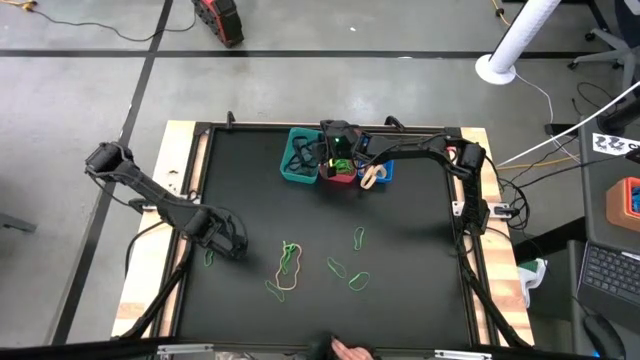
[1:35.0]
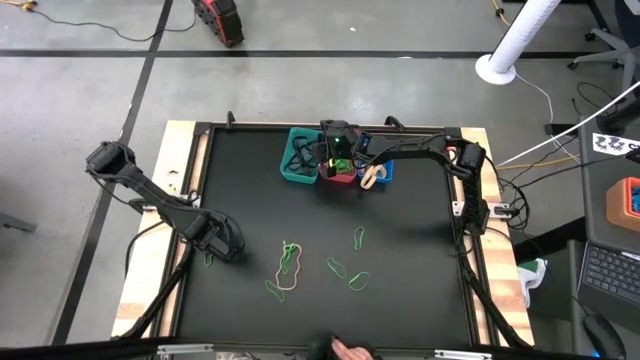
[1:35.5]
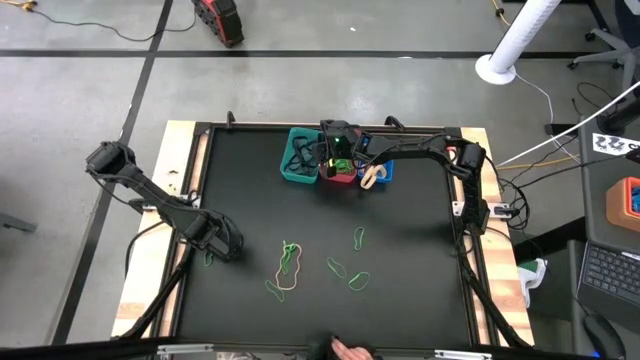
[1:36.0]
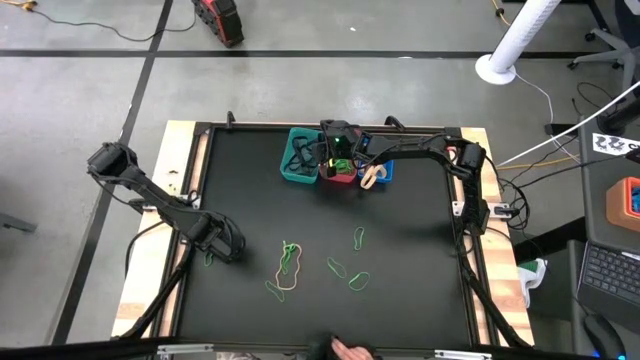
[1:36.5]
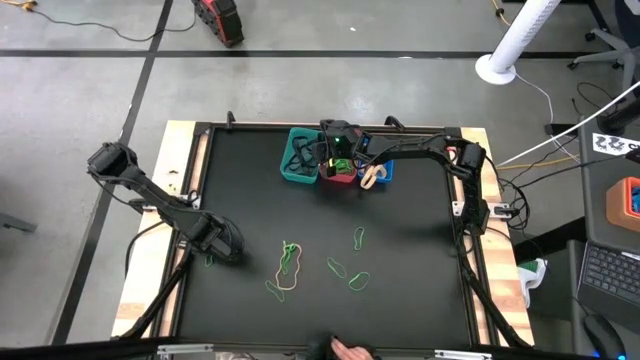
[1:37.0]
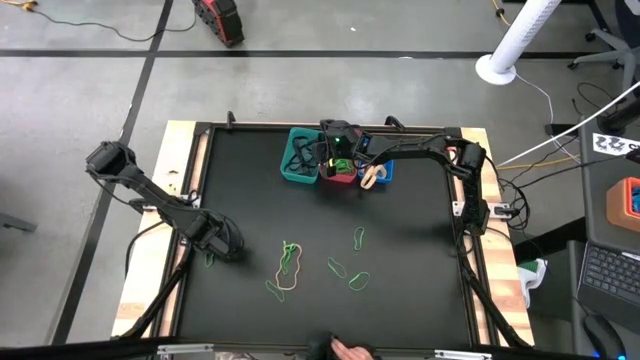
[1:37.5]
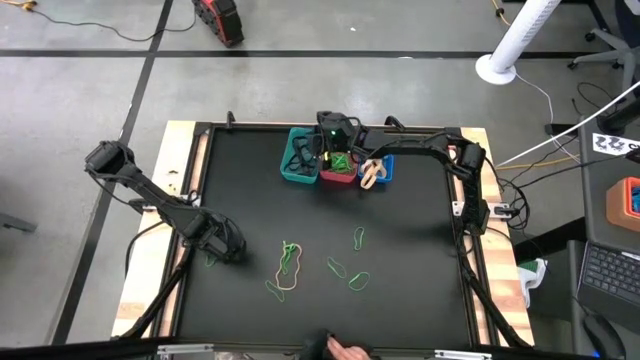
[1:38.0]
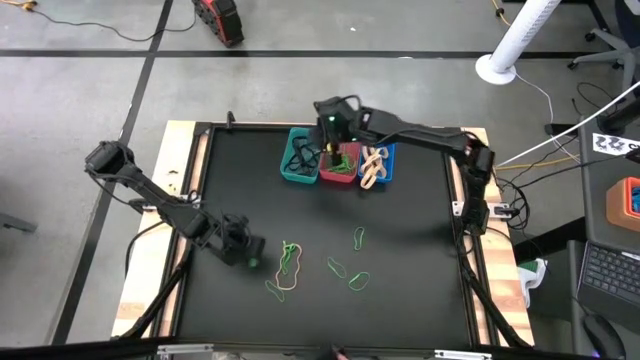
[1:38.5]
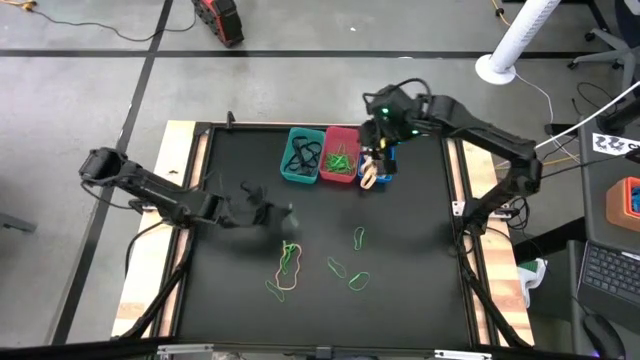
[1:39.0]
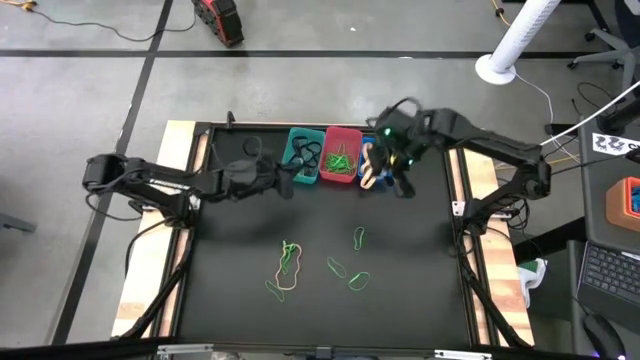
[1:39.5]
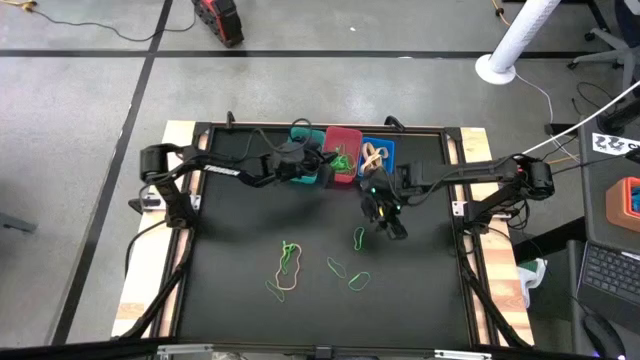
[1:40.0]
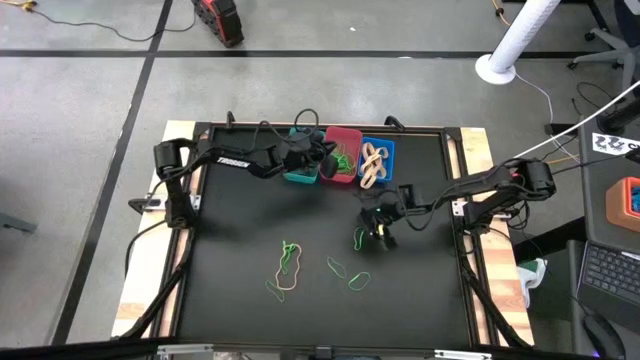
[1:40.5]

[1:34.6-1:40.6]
Task: Sort rubber bands into baskets
Put the green rubber band into the pink bin

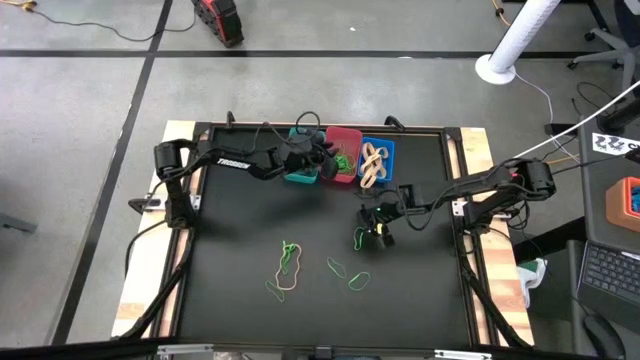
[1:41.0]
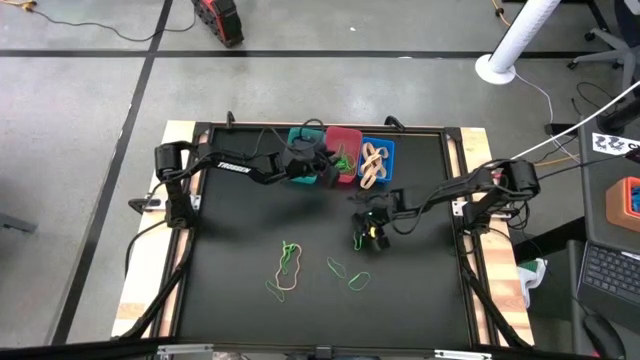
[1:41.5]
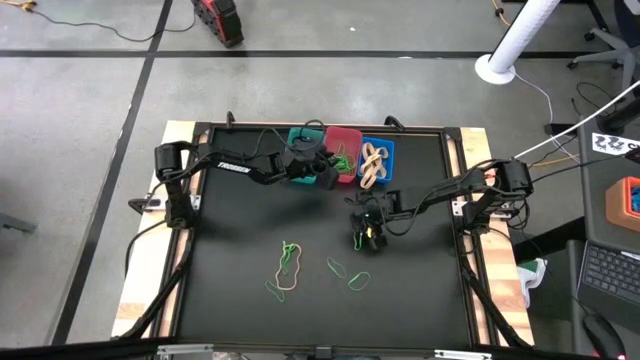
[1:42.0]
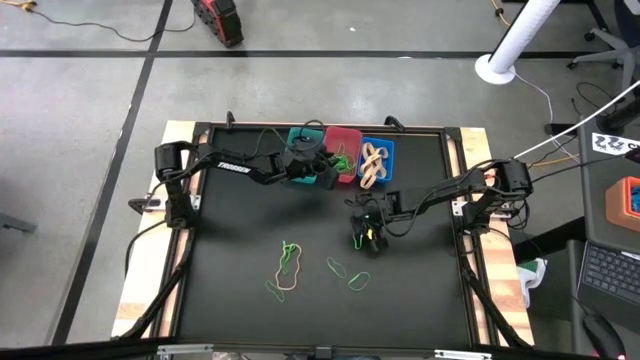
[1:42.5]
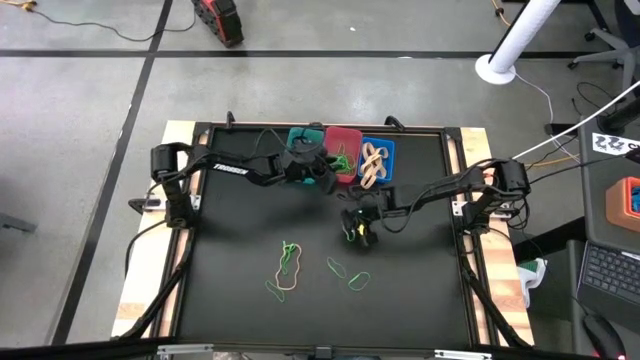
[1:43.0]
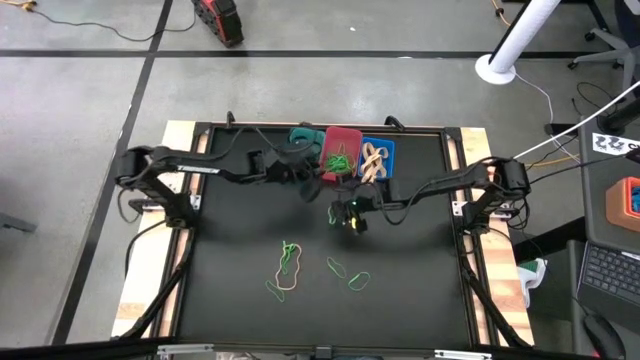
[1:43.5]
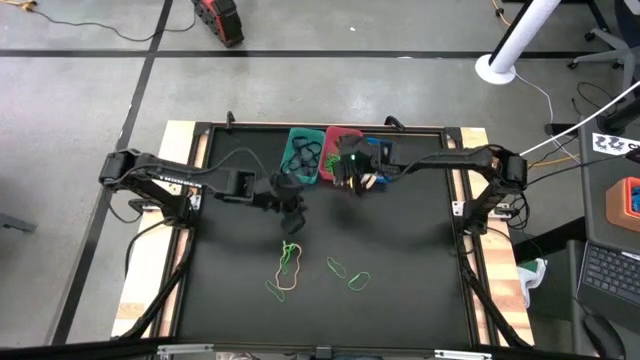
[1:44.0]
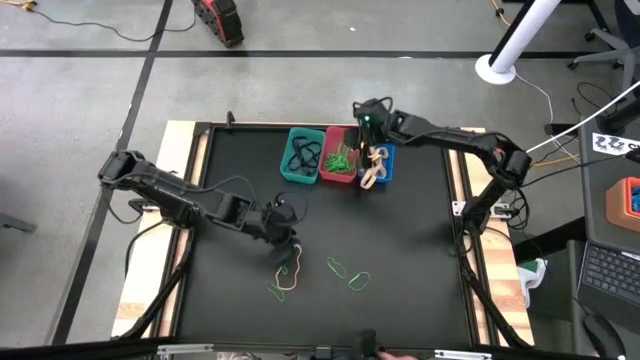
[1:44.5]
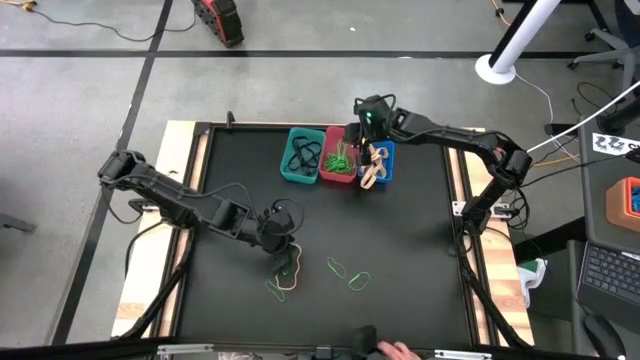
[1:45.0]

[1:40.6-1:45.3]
Put the green rubber band into the pink bin

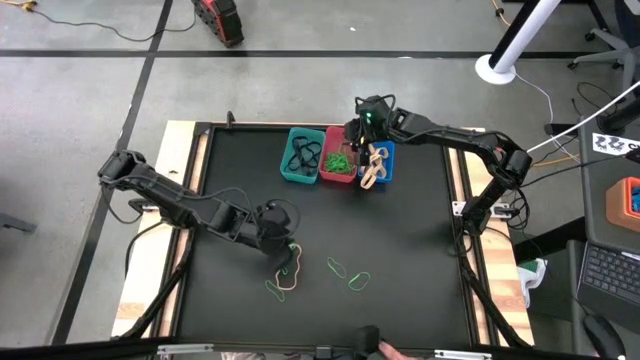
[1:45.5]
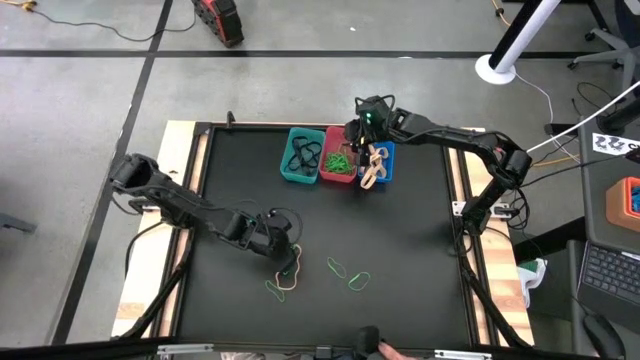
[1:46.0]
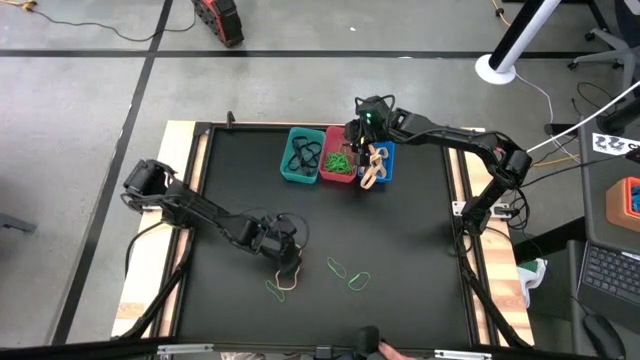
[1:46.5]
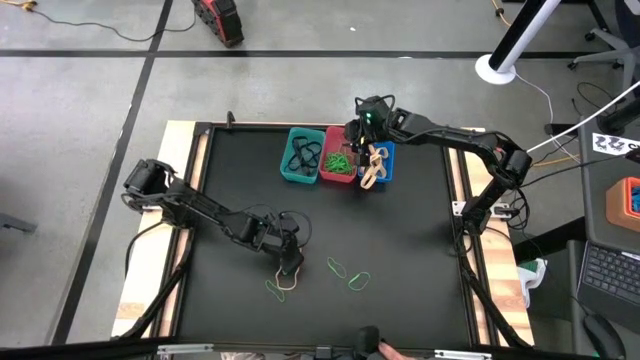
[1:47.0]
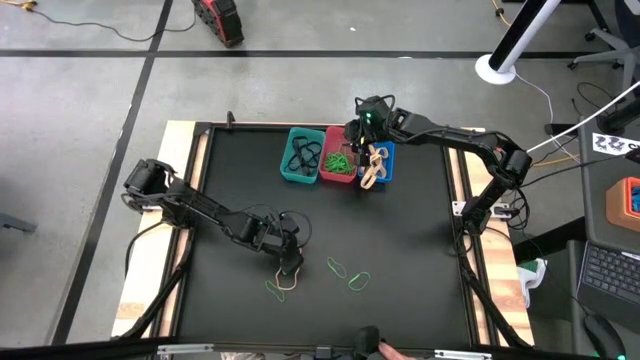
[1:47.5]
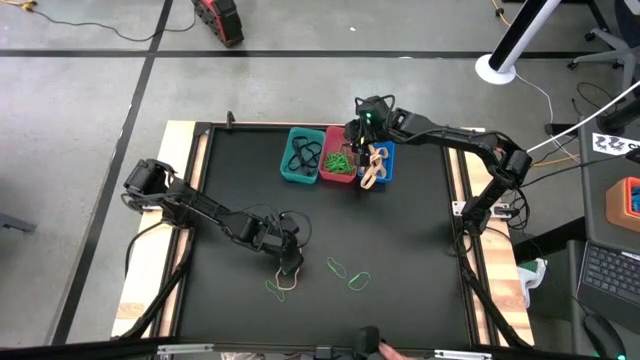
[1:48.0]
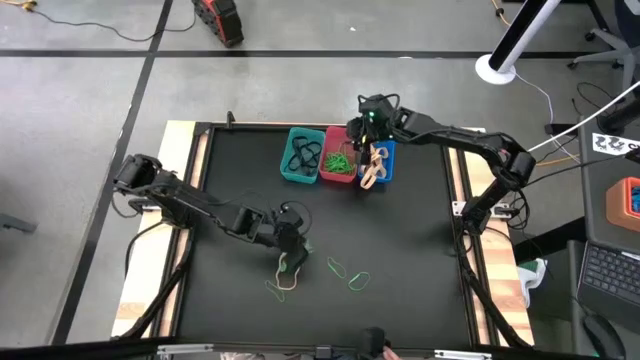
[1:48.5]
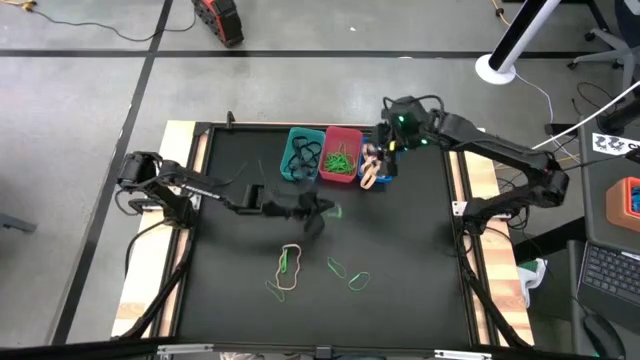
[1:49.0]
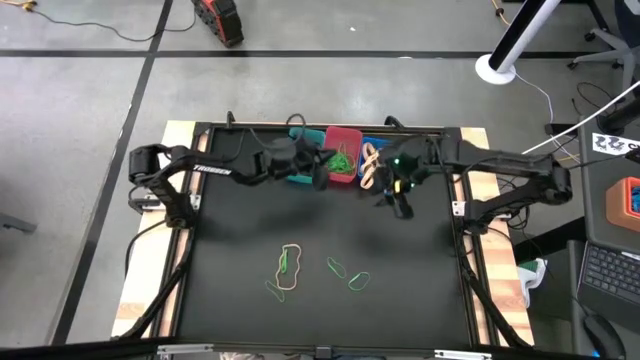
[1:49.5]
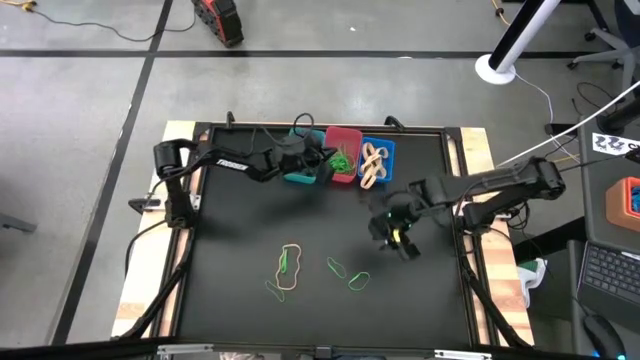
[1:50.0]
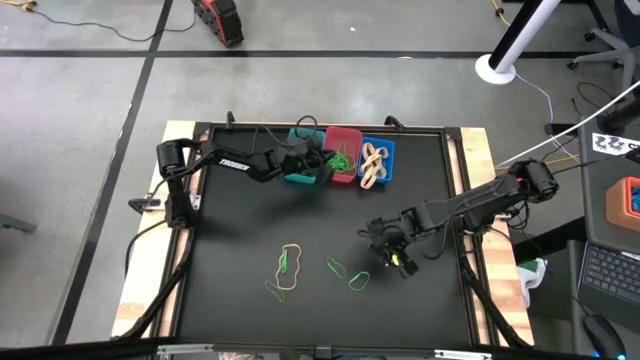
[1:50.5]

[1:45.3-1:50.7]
Put the green rubber band into the pink bin

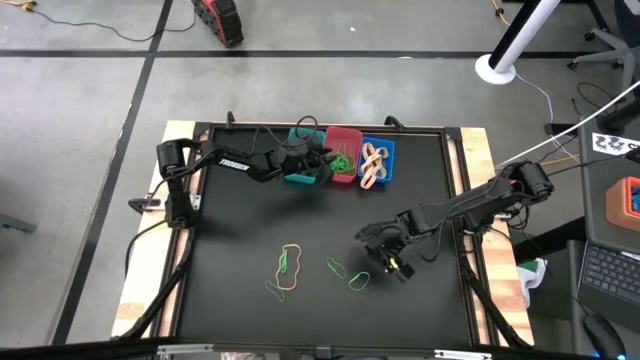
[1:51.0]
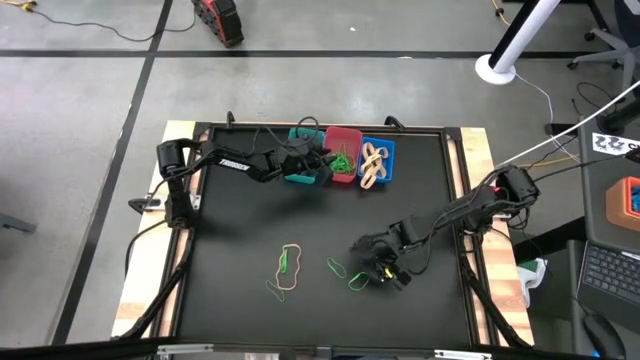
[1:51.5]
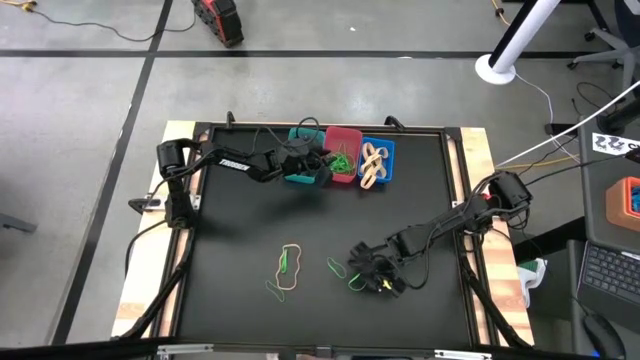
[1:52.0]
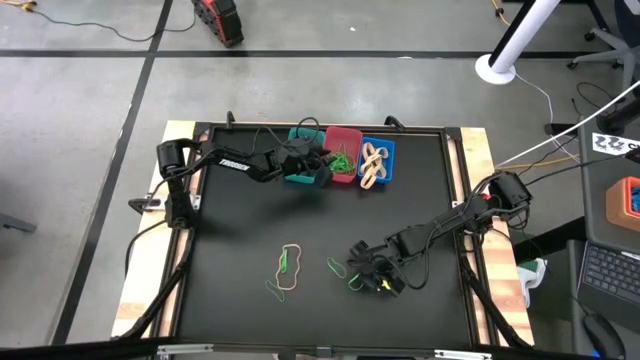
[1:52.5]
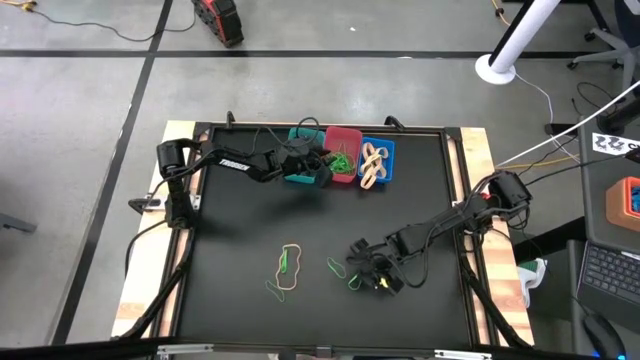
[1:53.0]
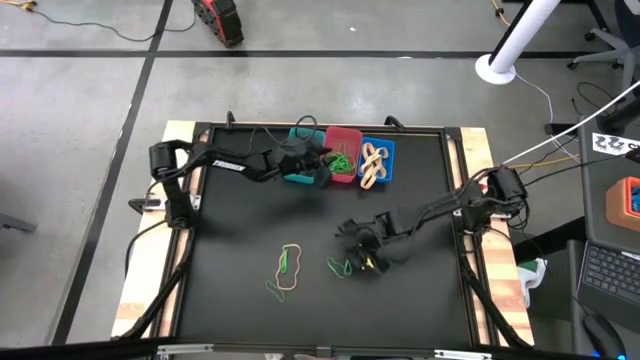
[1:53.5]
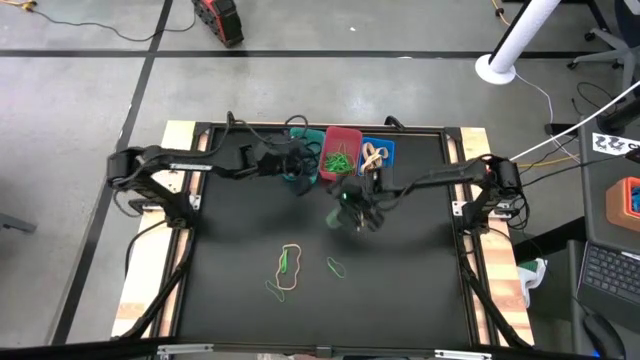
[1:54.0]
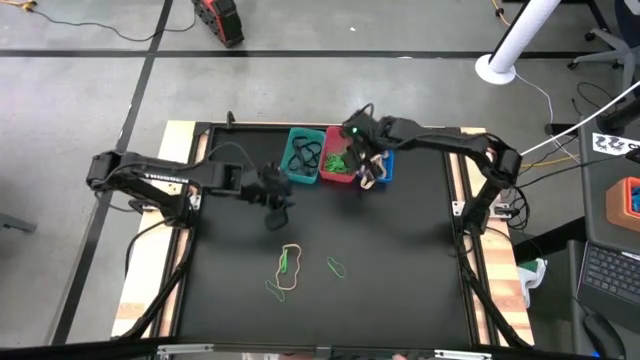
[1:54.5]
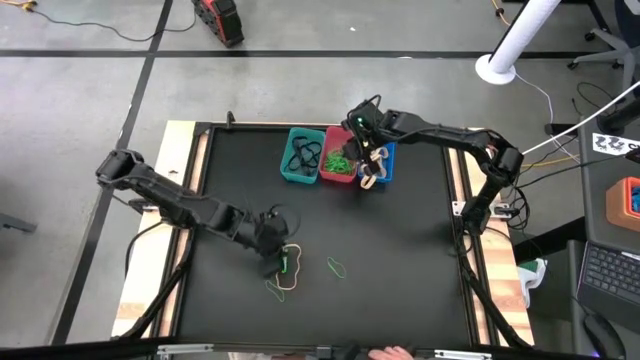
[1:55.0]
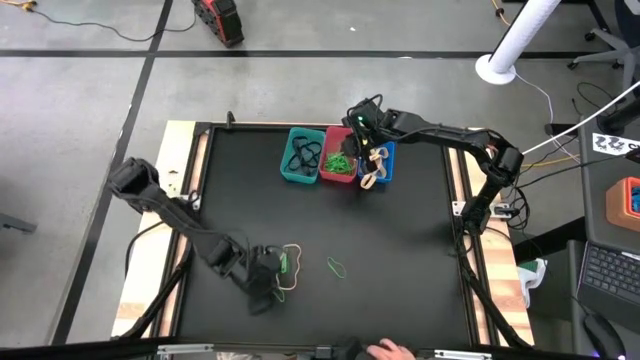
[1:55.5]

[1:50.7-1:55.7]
Put the green rubber band into the pink bin
